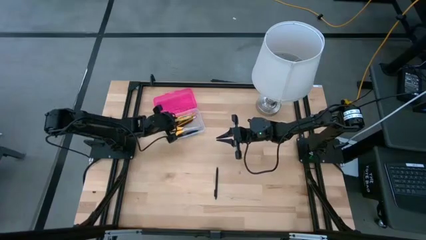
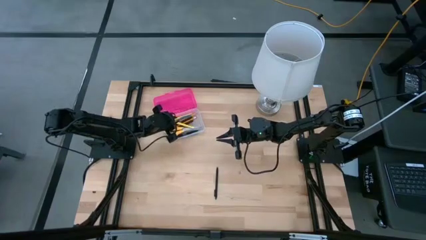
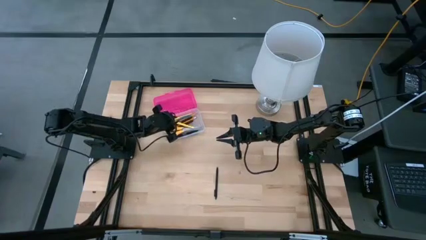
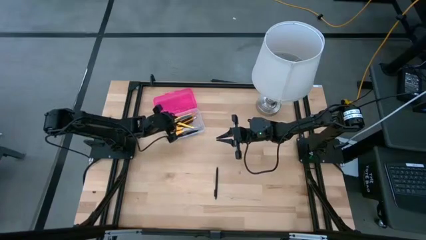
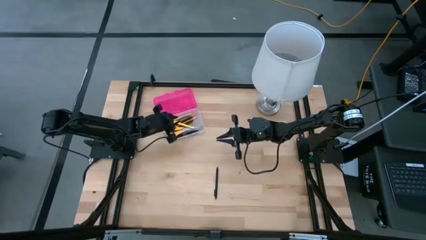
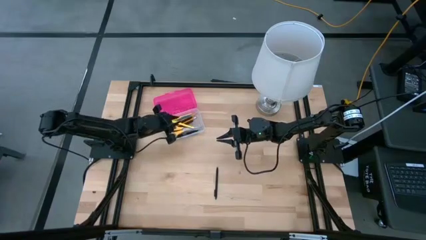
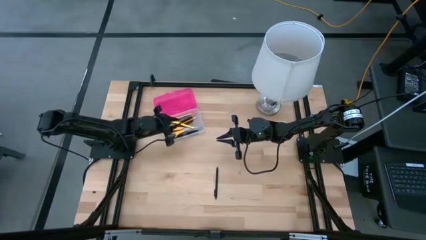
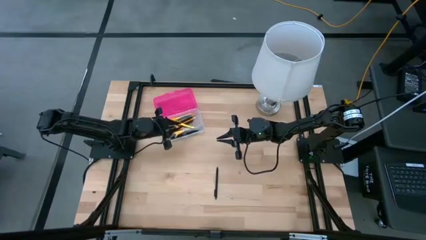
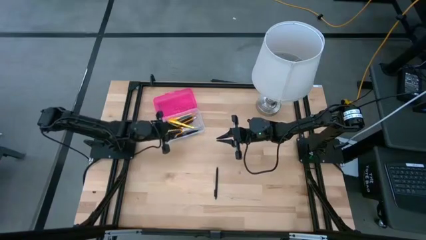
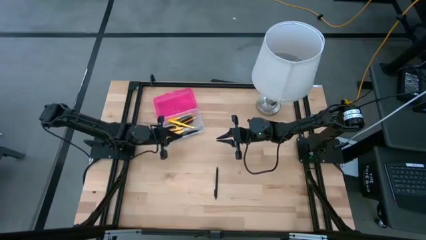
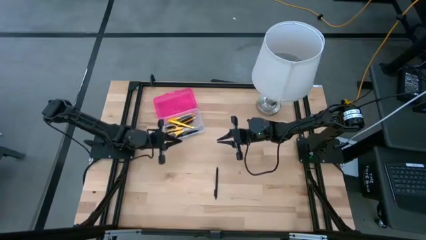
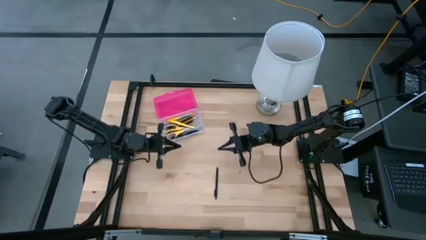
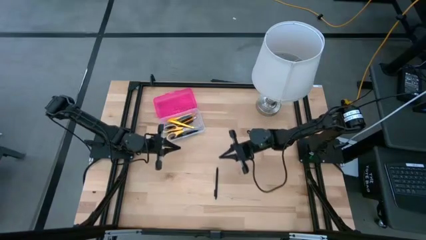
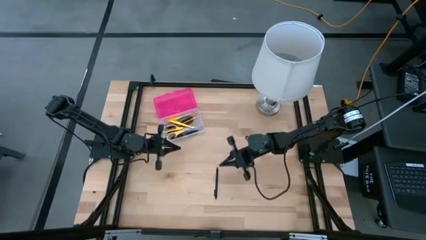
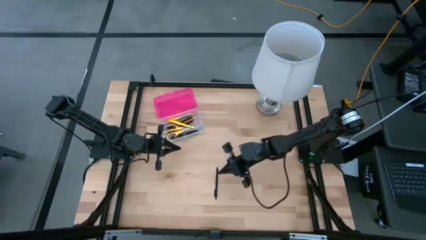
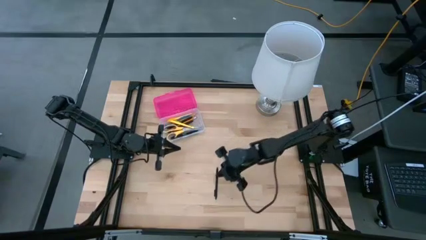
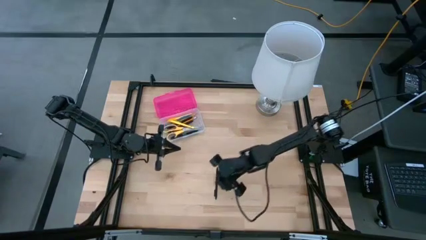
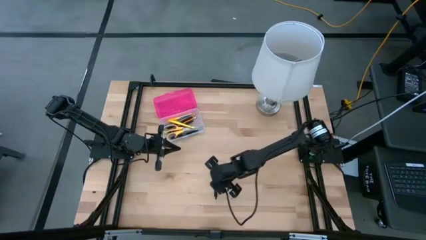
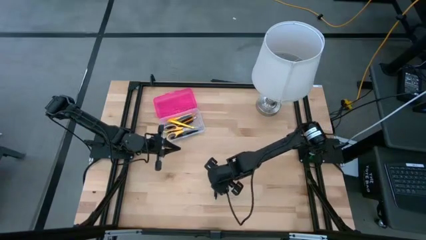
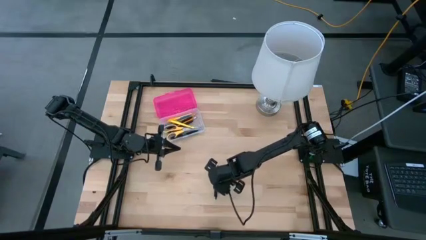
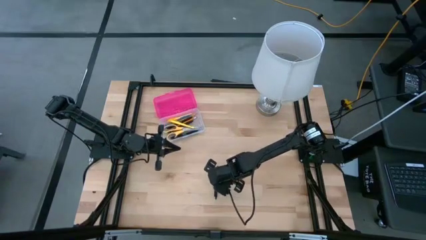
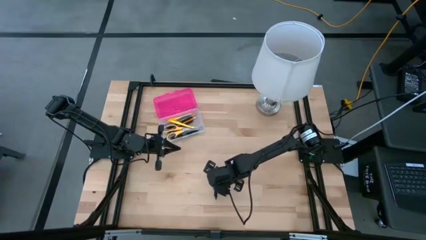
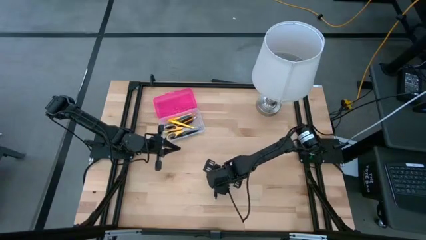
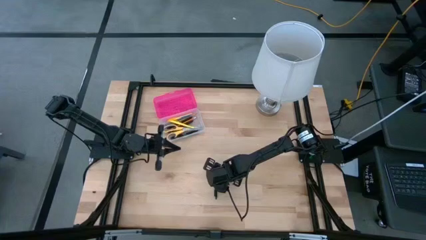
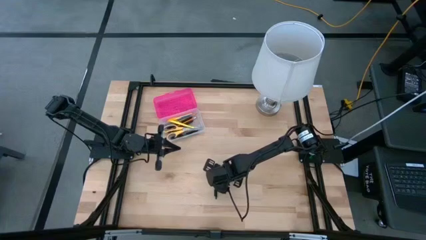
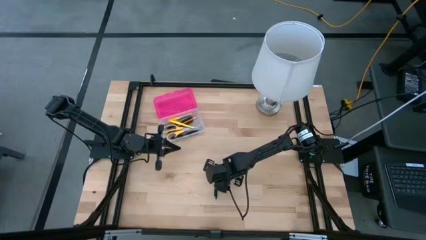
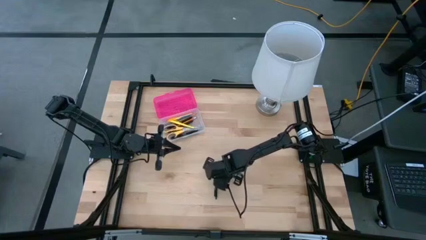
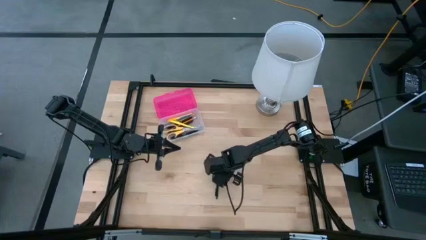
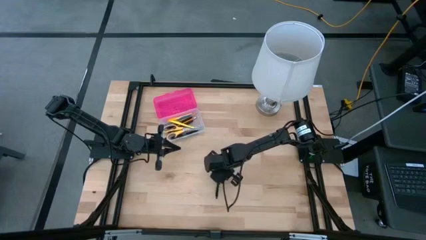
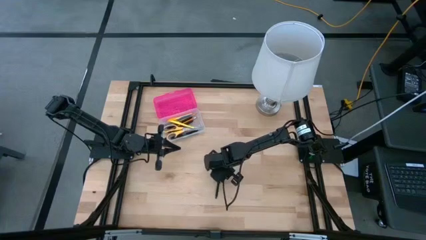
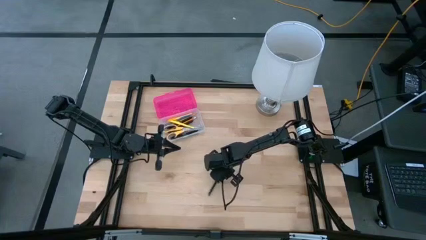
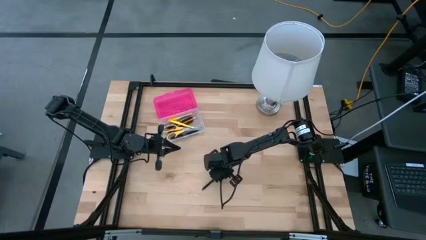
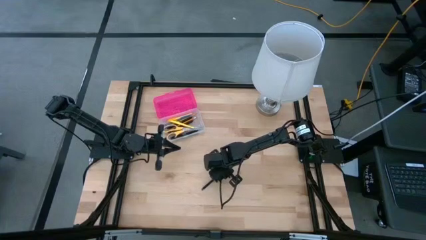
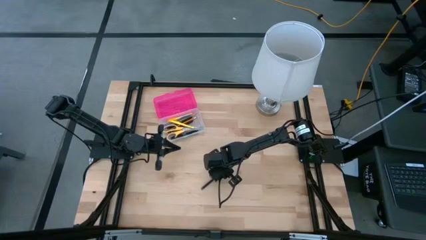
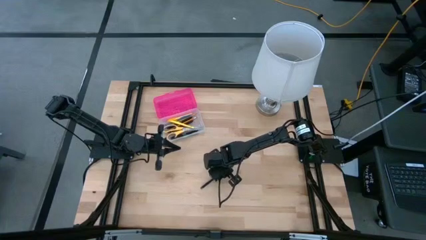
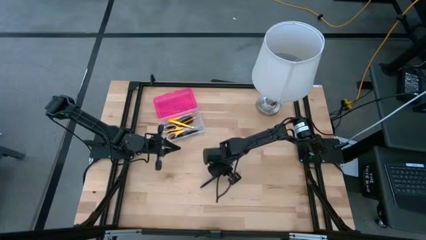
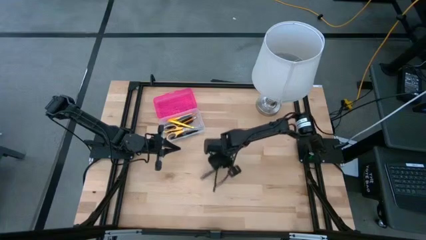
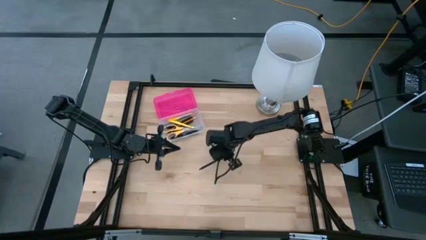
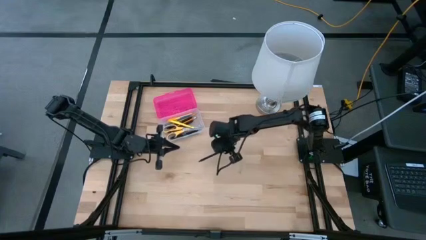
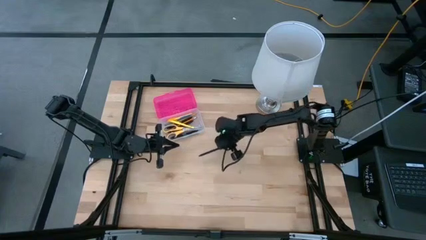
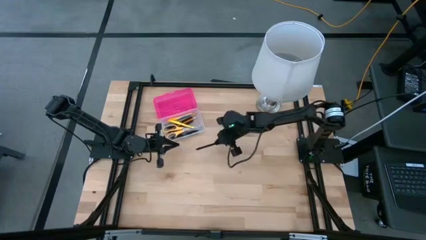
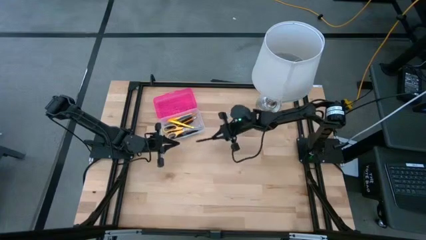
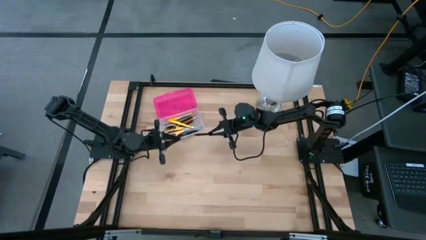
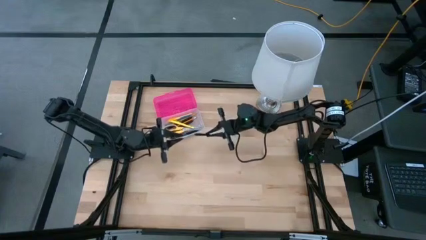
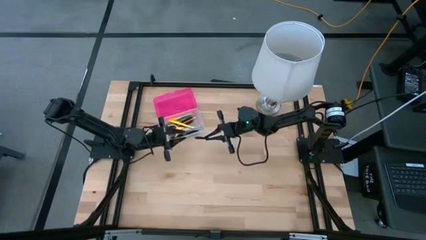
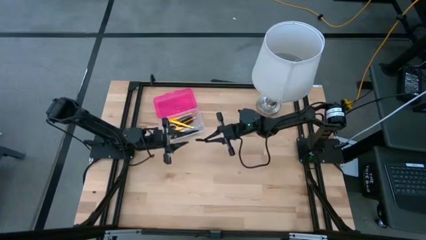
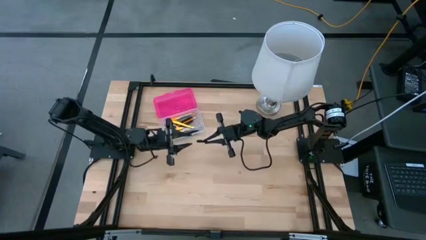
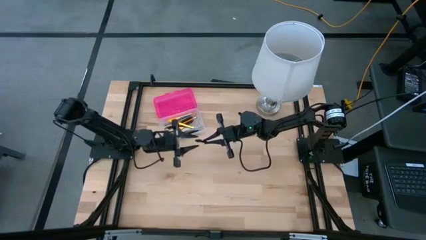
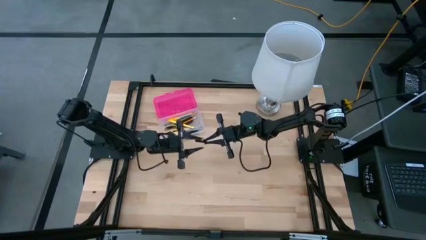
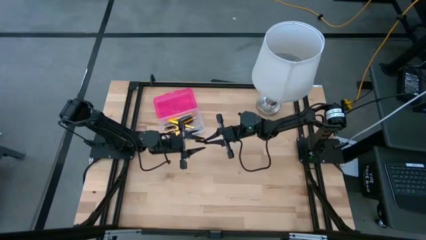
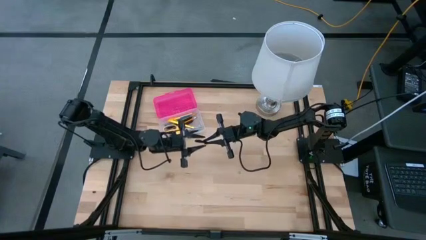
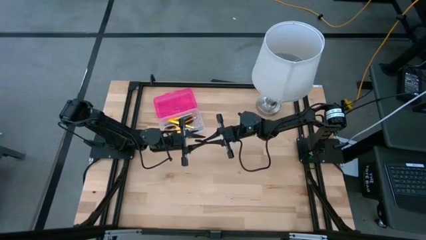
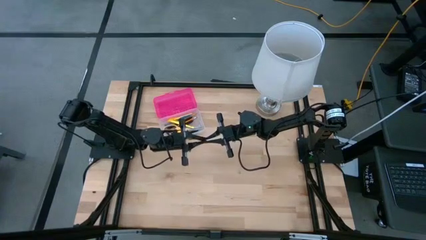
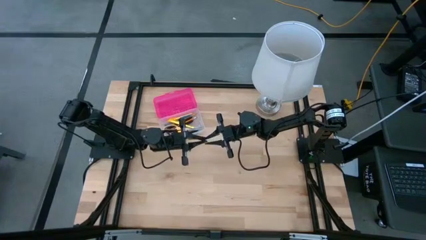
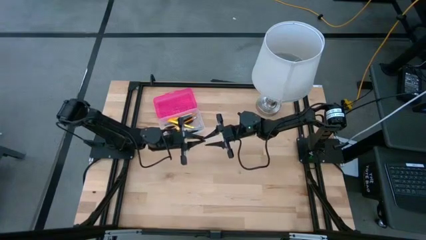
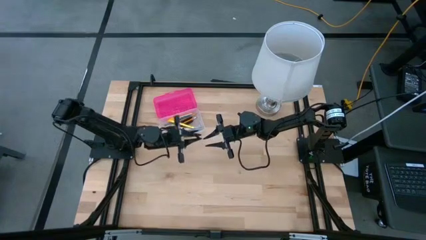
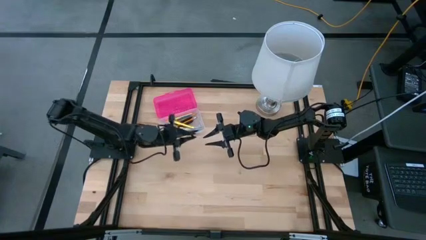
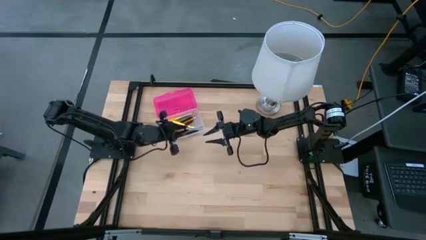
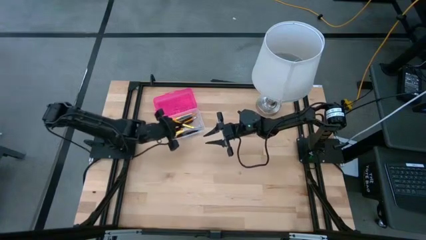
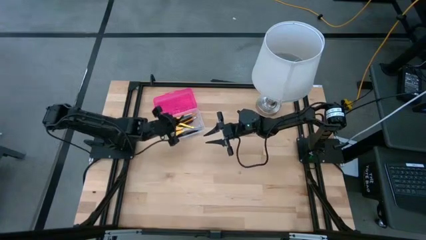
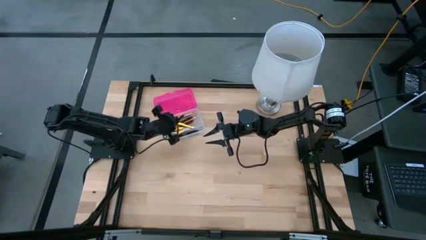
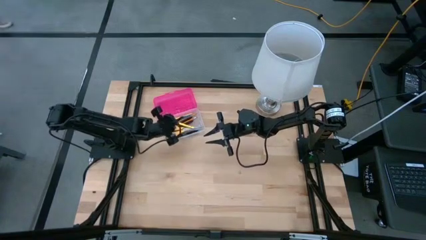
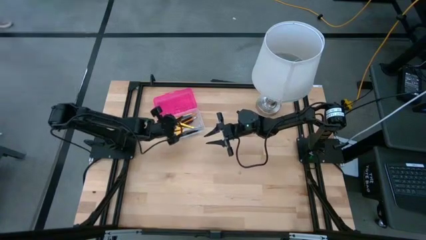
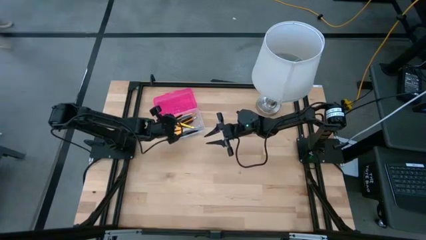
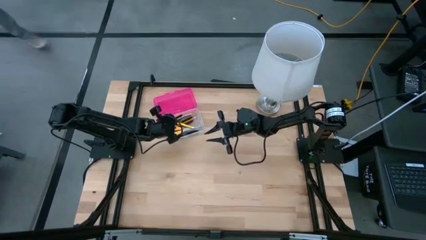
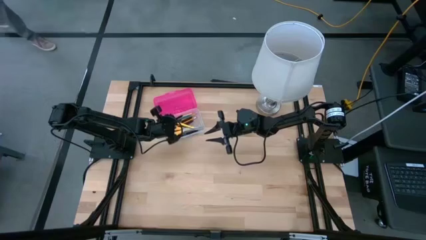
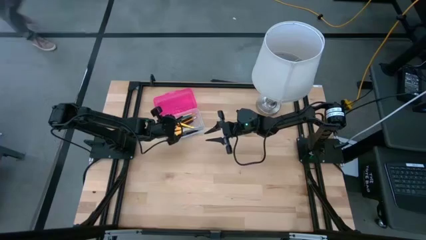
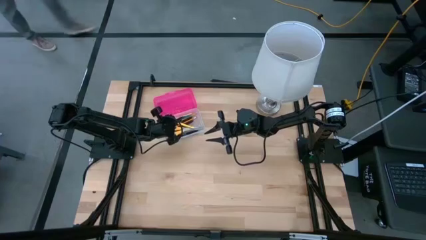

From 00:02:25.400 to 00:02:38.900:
Task: Pick & place school supplies into a supply box
Put the black pen into the pink supply box

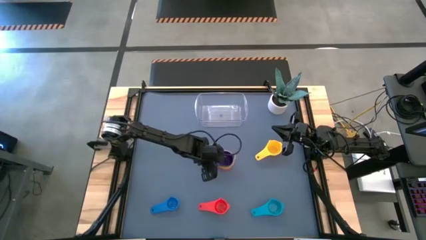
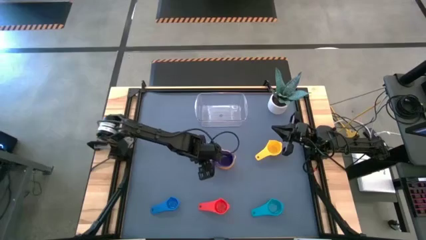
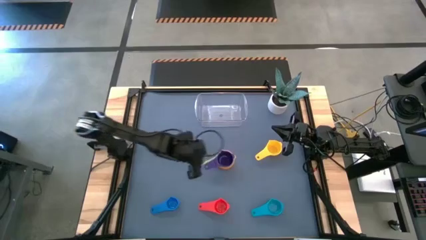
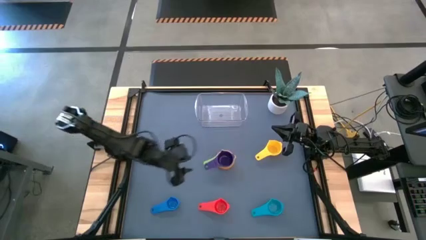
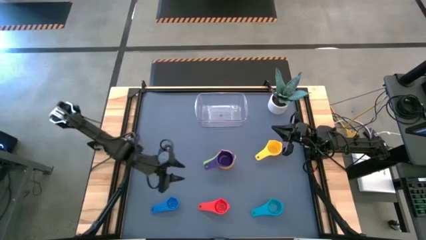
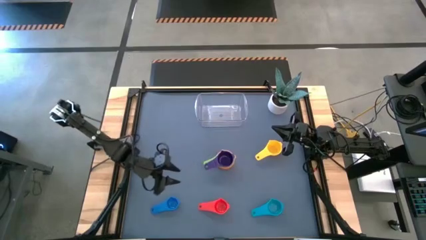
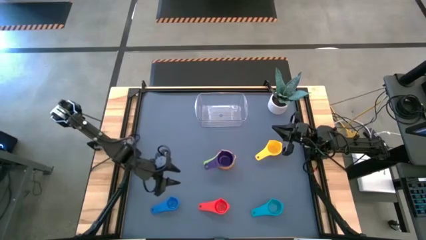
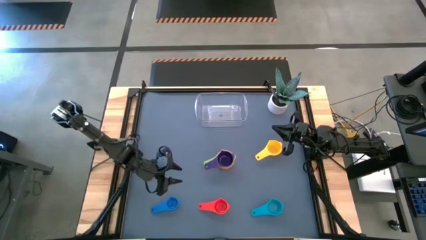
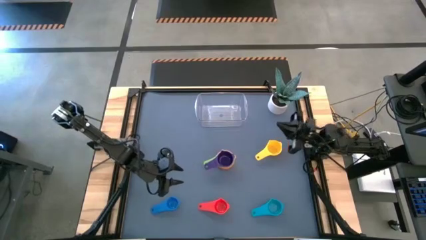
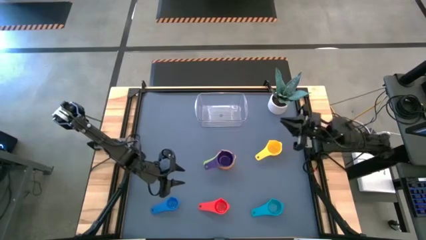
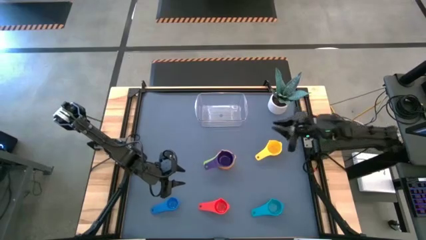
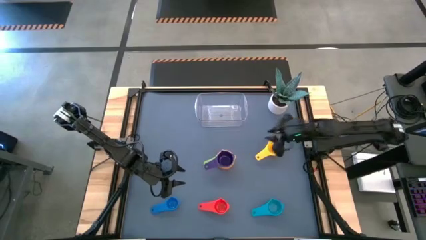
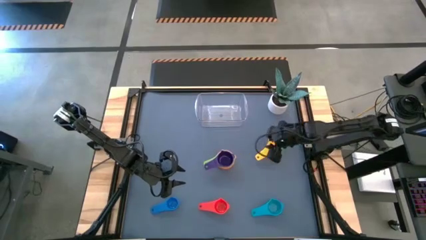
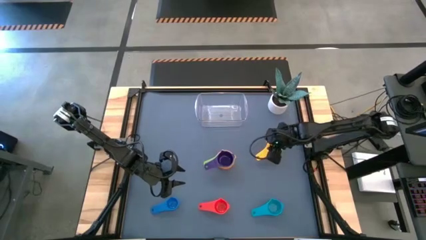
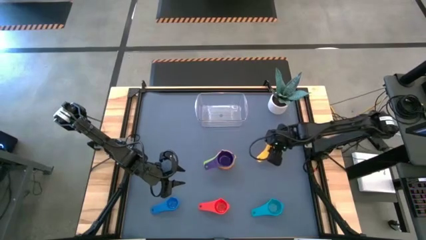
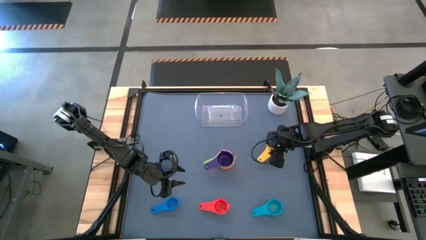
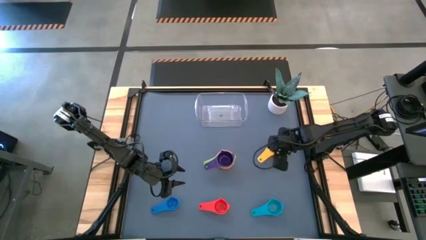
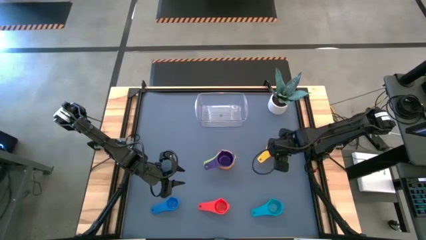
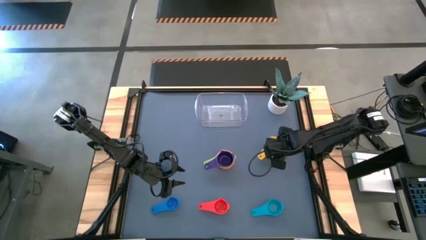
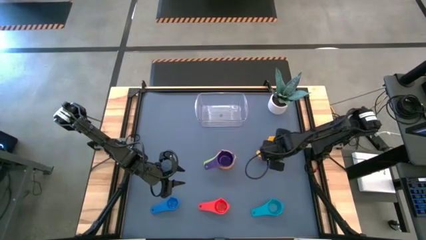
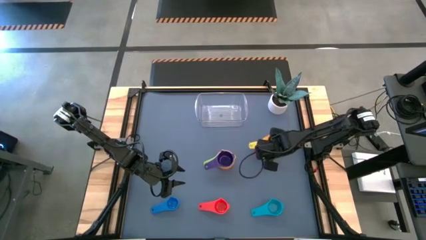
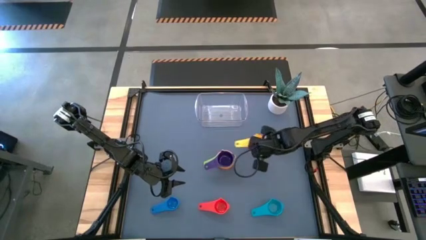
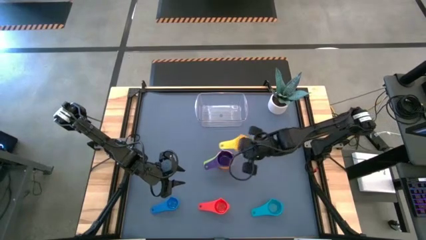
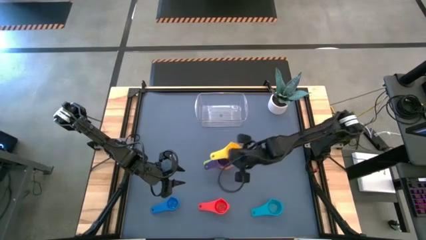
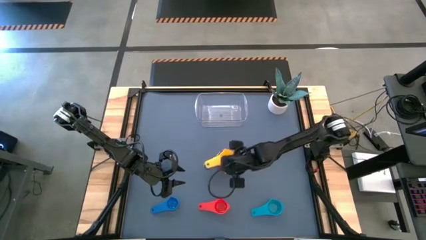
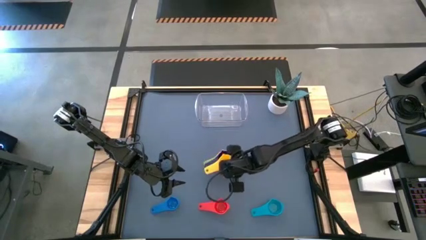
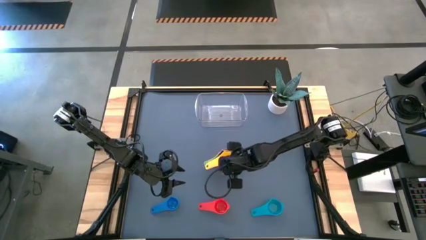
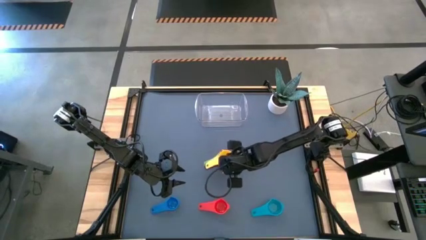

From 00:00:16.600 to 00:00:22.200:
Task: Nest measuring cups in basket
Stack the yellow measuring cup on top of the violet measuring cup
